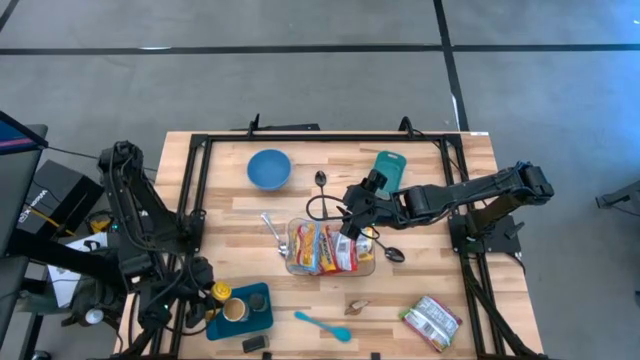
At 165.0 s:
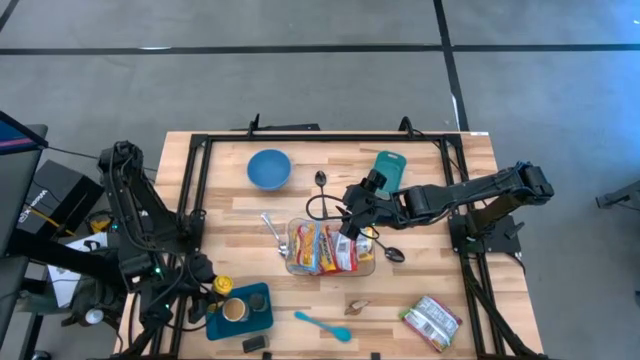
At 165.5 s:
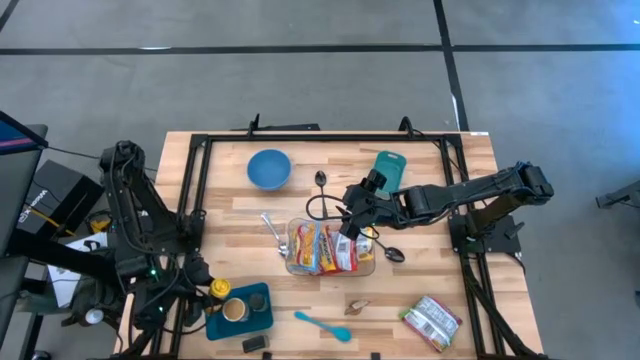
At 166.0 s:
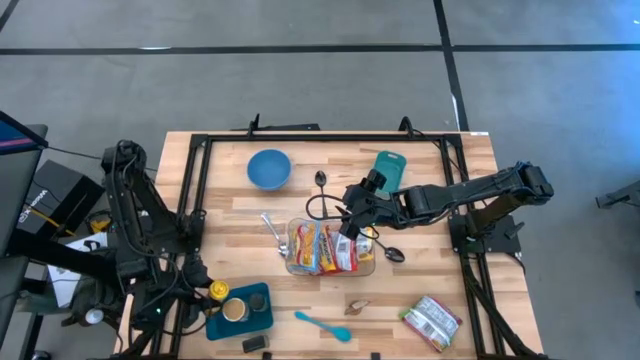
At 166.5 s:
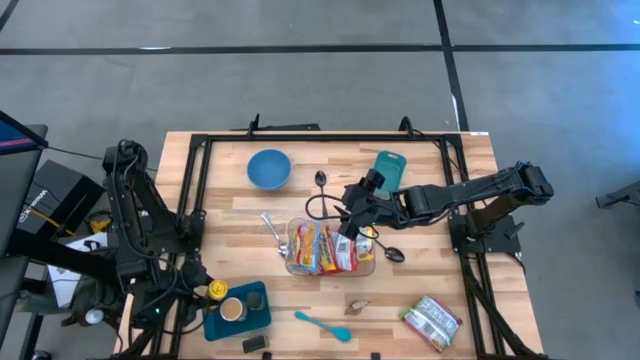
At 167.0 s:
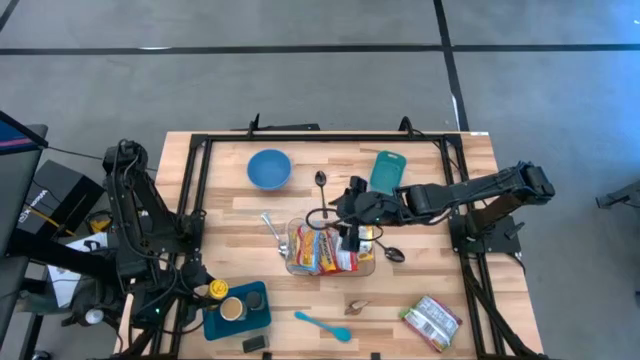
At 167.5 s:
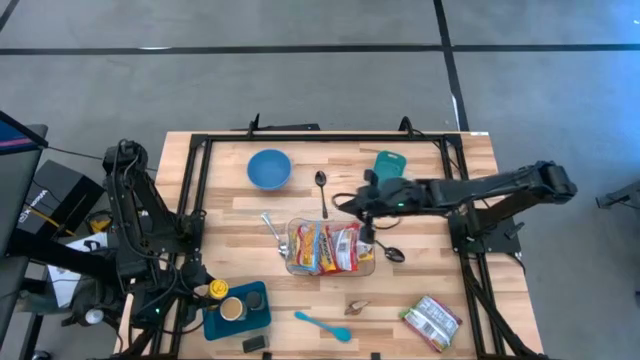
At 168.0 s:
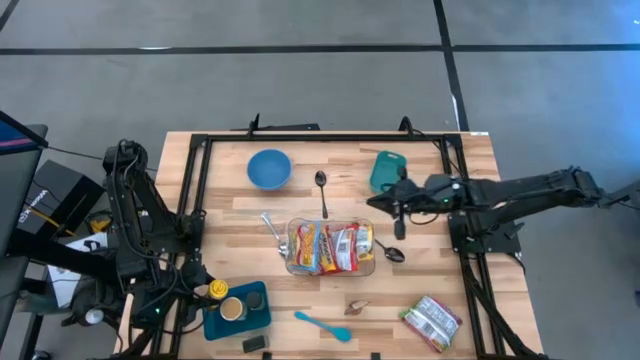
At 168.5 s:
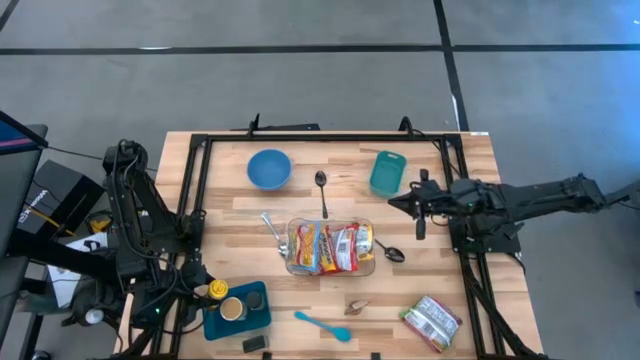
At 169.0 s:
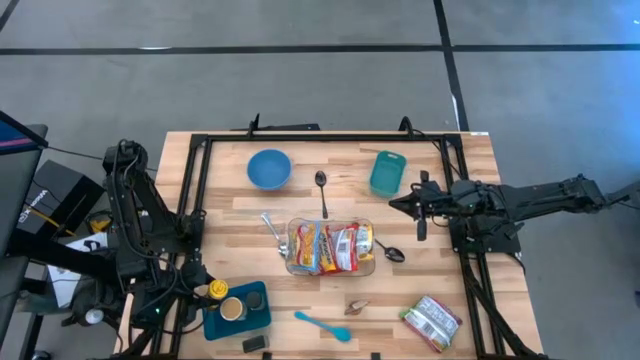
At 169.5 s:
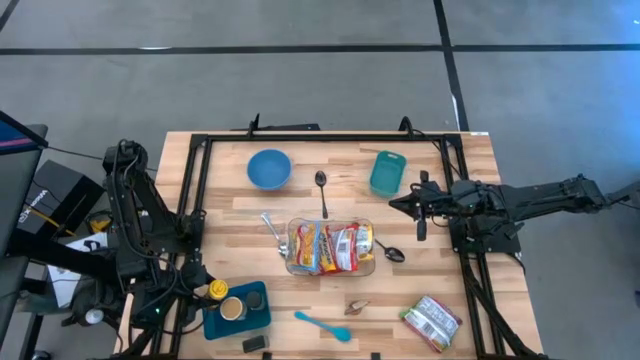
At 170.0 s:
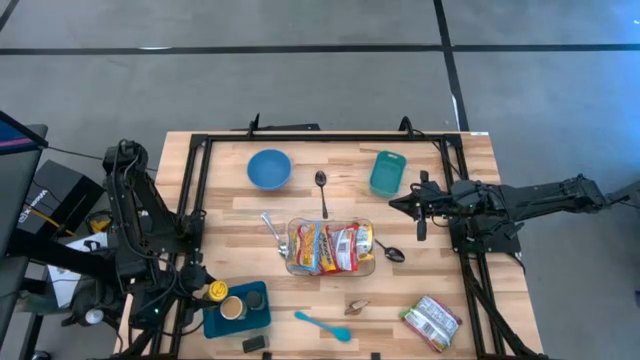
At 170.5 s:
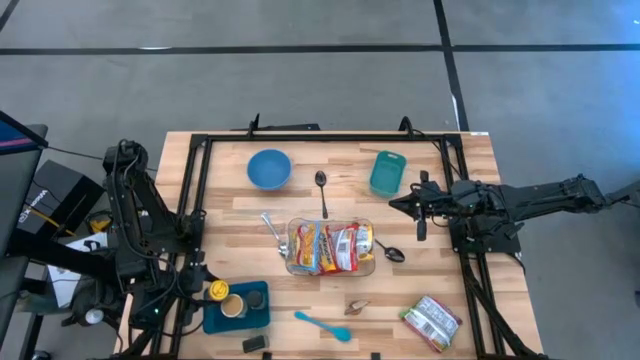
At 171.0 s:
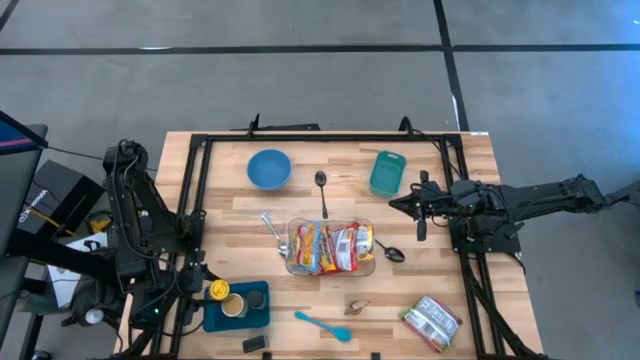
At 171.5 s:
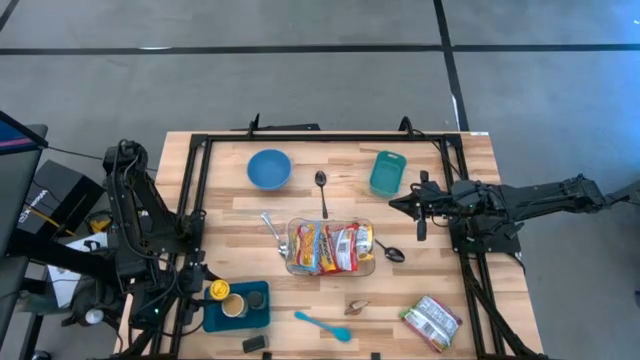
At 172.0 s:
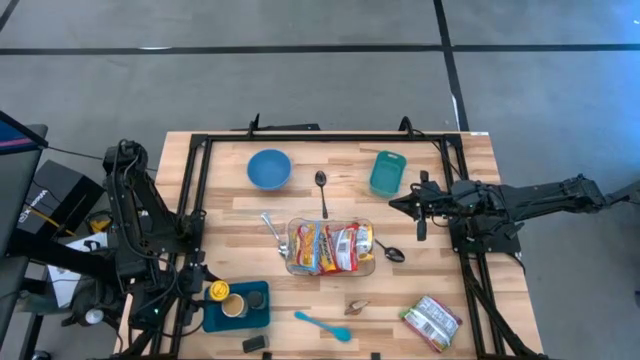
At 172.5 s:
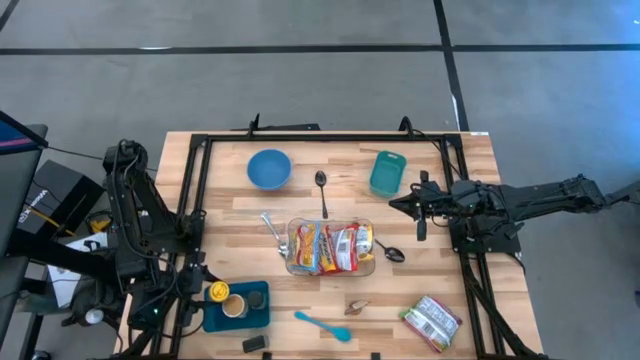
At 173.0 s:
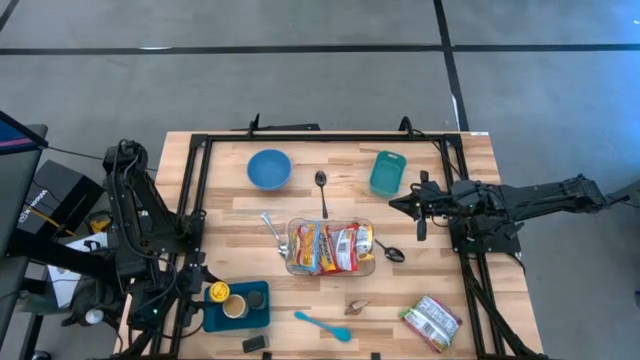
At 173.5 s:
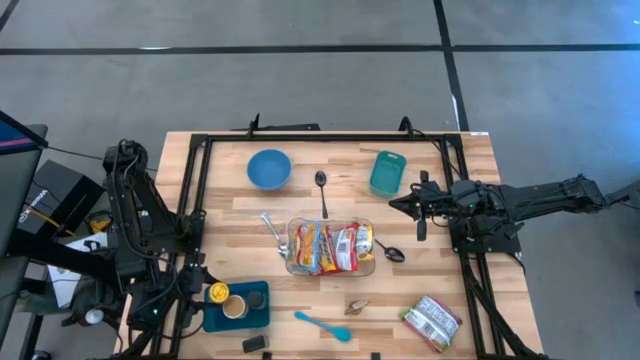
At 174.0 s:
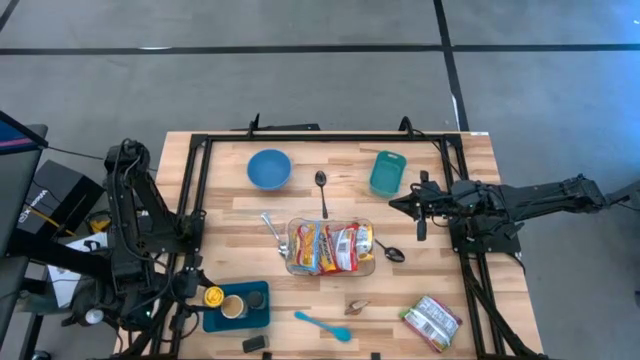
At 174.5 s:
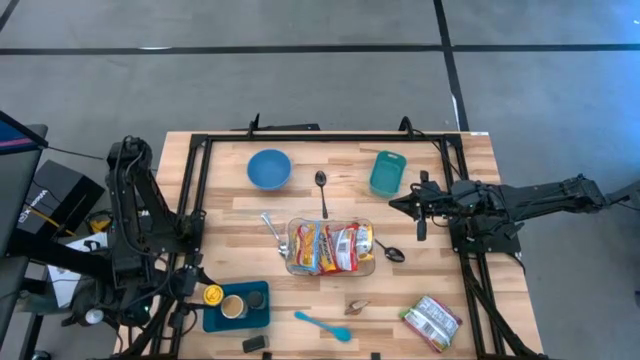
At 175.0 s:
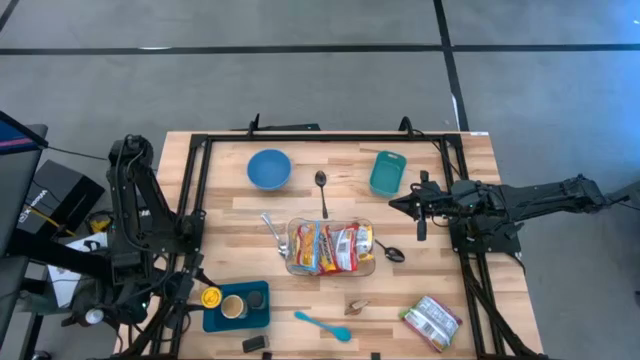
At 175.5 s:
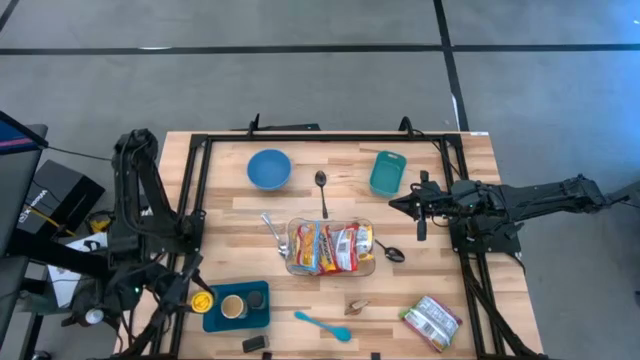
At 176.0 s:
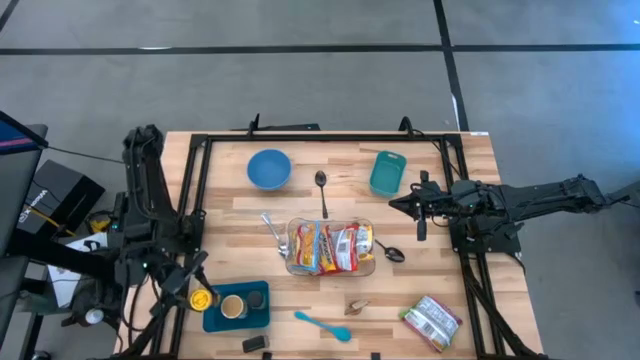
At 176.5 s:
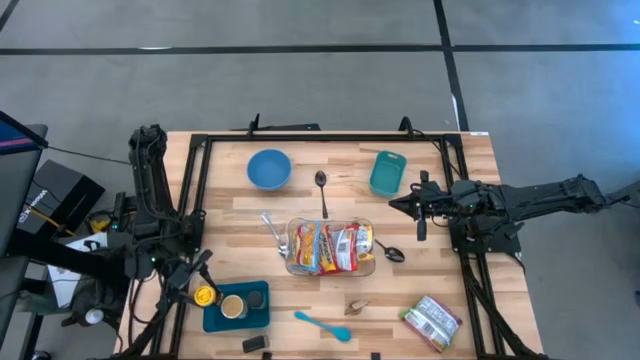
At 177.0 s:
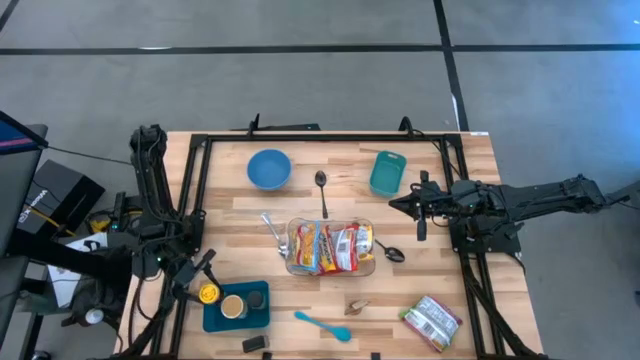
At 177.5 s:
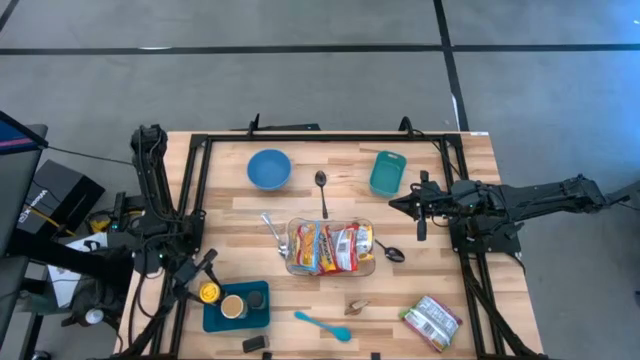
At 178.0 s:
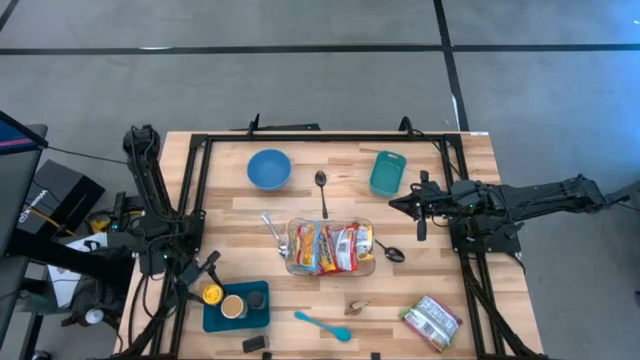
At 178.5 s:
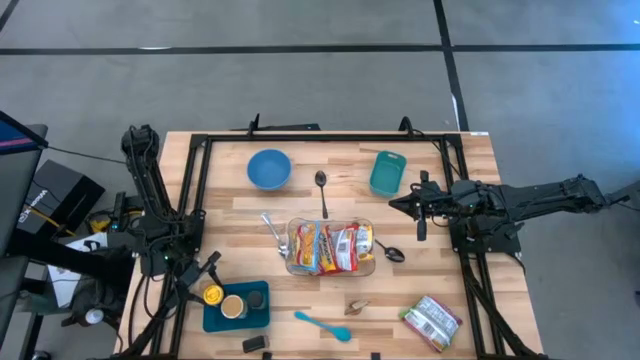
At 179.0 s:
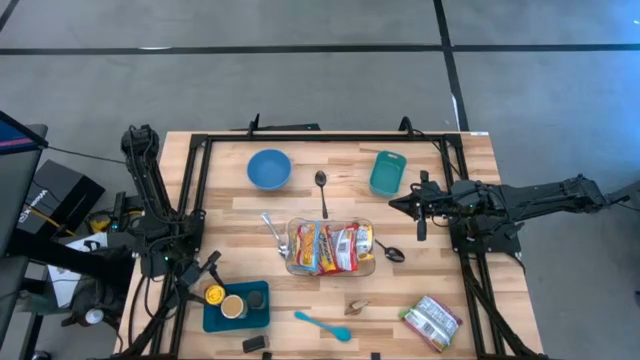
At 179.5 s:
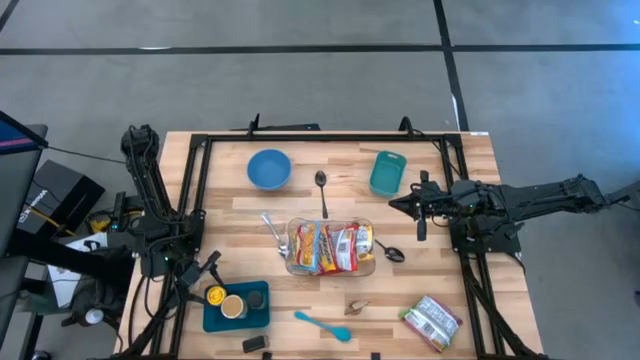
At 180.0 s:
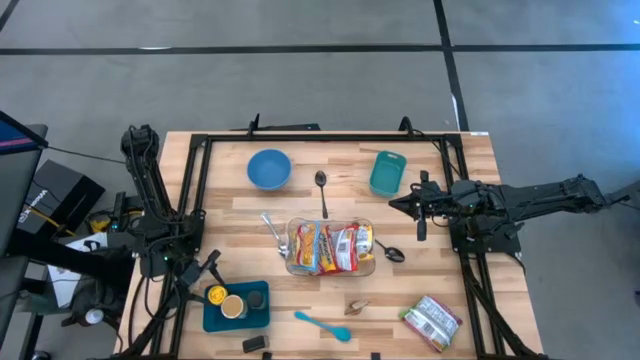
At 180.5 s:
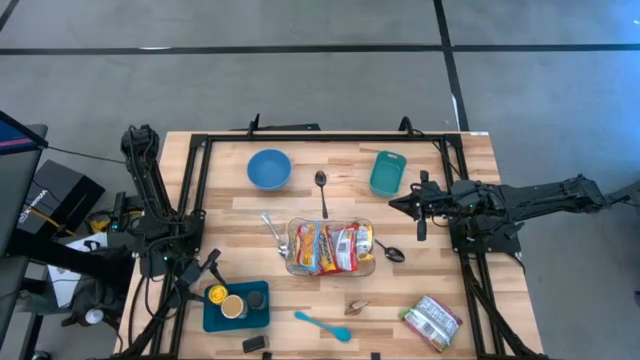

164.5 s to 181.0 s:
Task: Pick & Place Food Item
Put the yellow spice can into the dark blue bin

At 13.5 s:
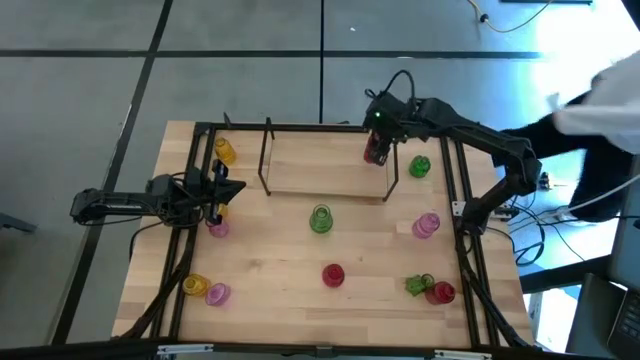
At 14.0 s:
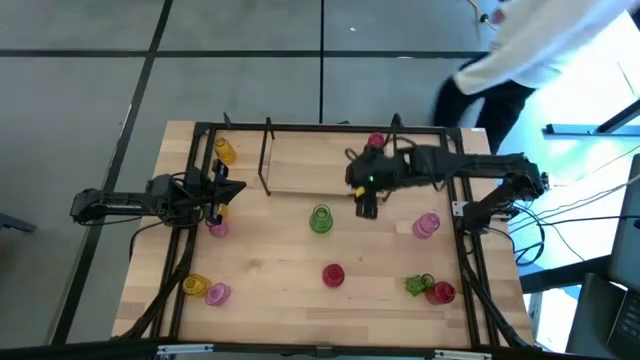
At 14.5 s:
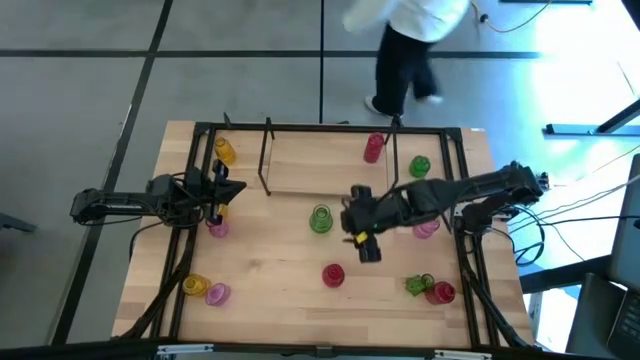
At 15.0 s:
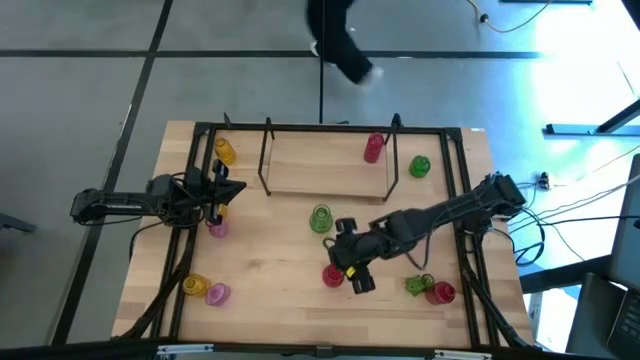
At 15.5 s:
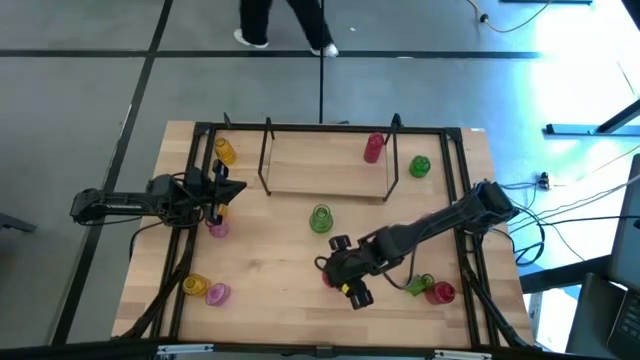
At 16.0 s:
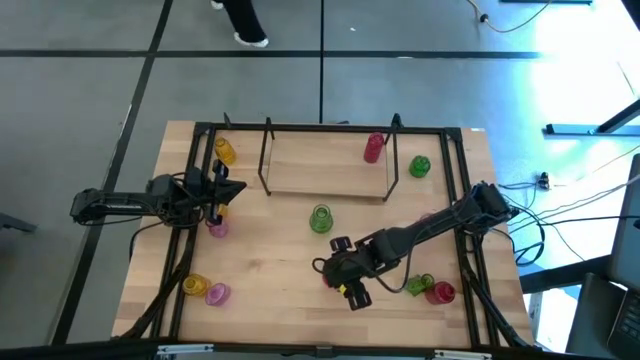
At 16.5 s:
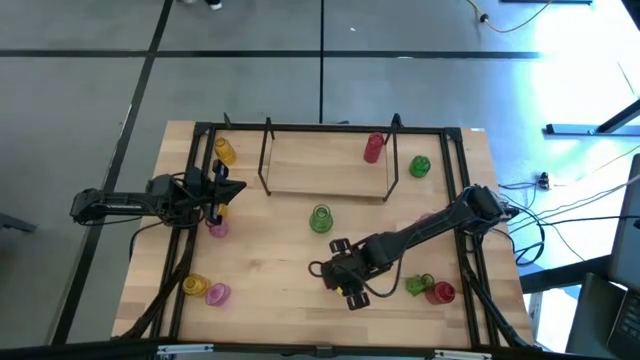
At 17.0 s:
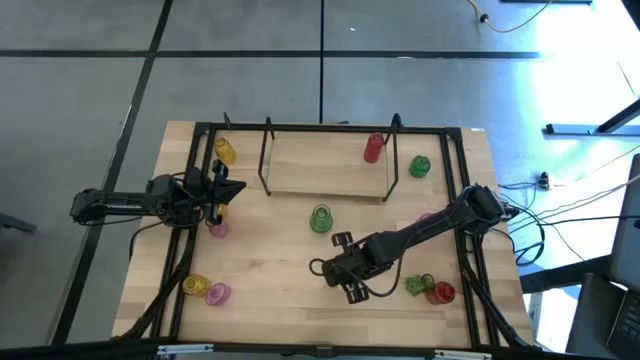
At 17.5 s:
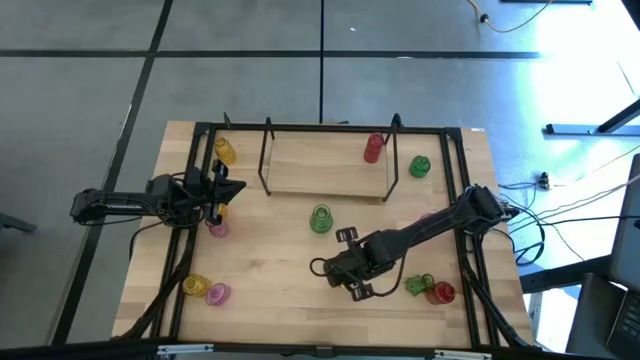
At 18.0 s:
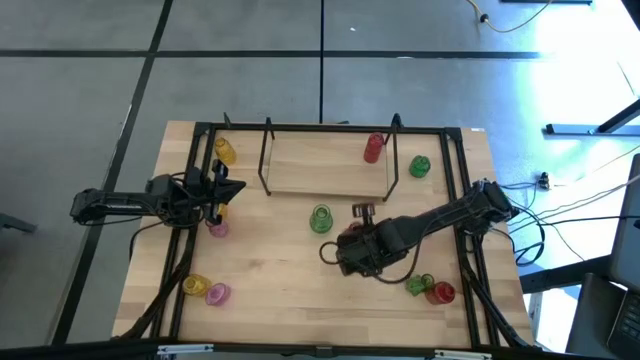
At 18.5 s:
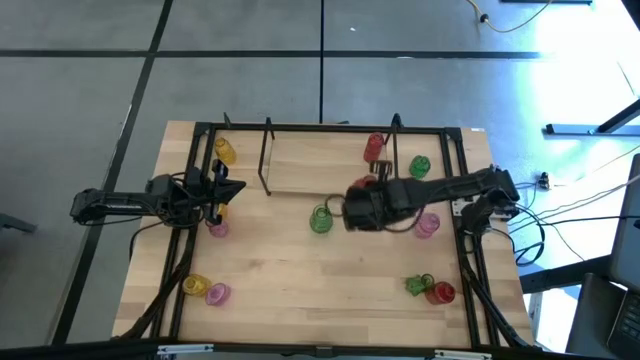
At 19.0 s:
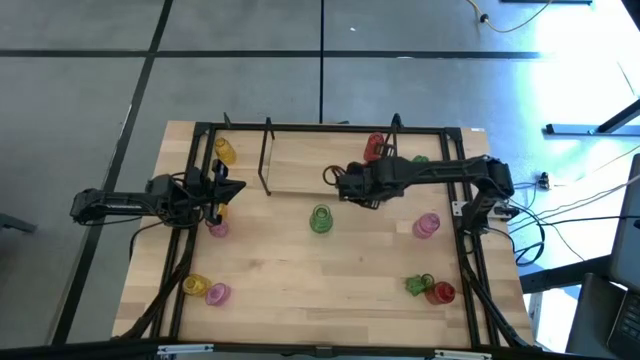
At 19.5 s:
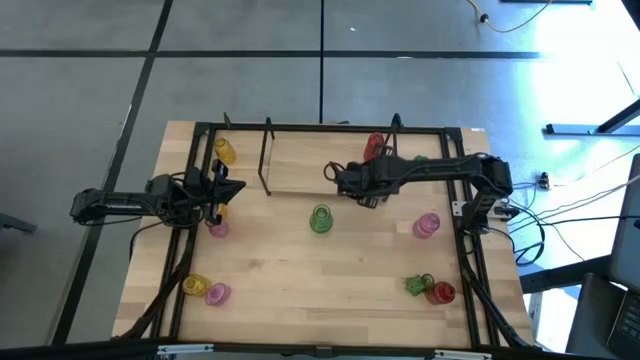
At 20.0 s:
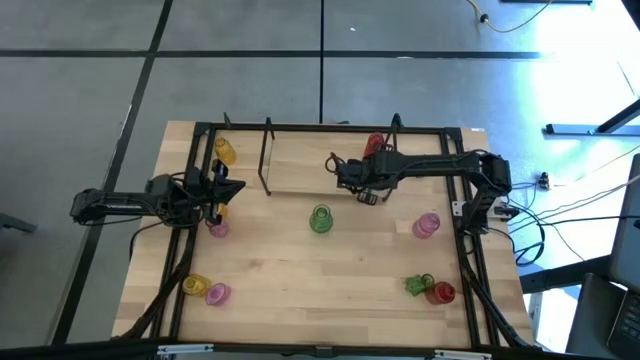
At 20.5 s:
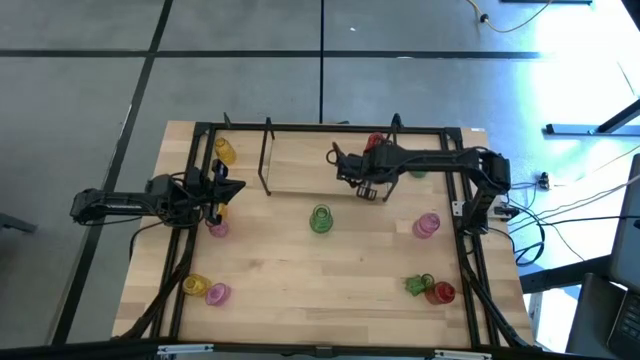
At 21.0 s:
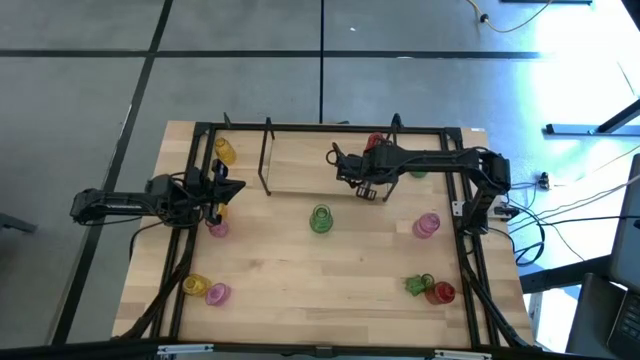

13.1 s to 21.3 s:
Task: sort vases onto shelf
Put the left red vase on the shelf aligned with the other red vase
